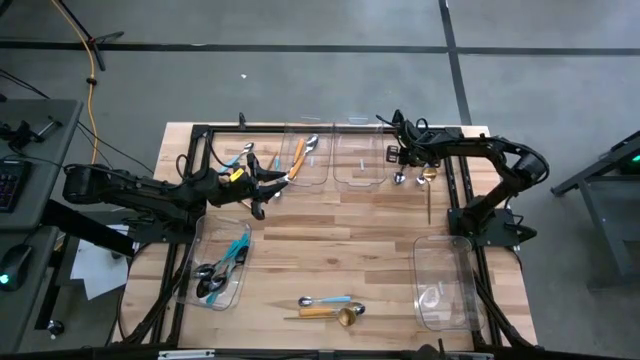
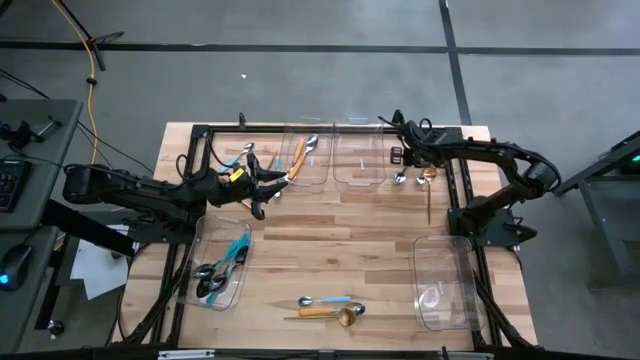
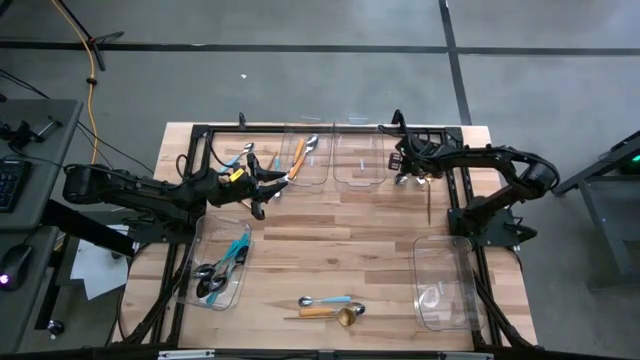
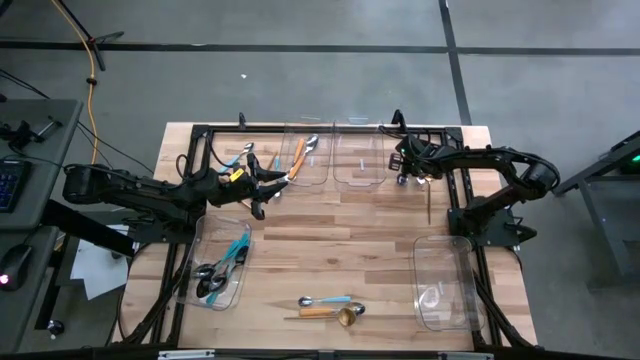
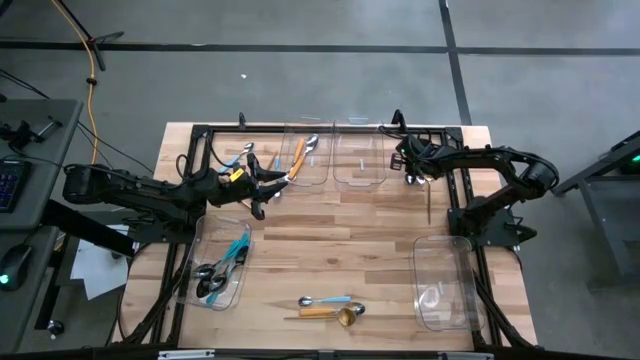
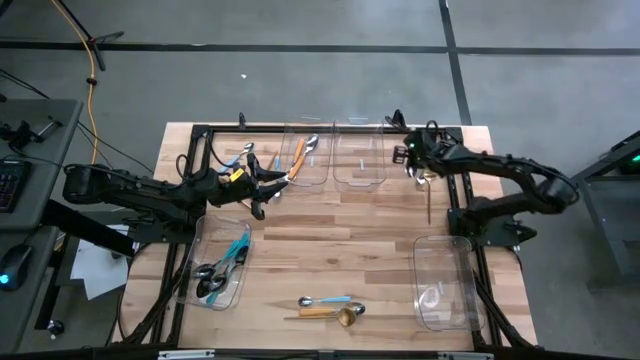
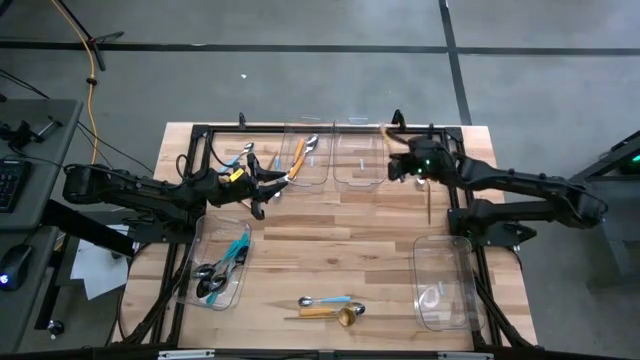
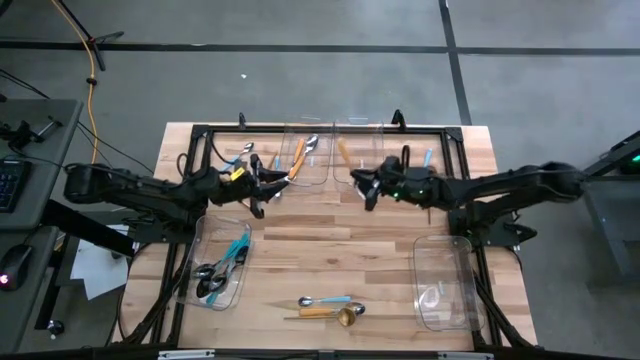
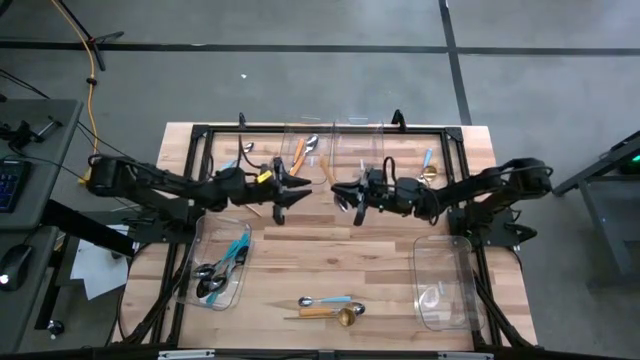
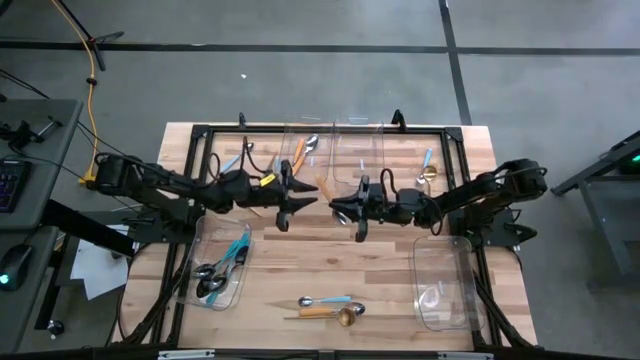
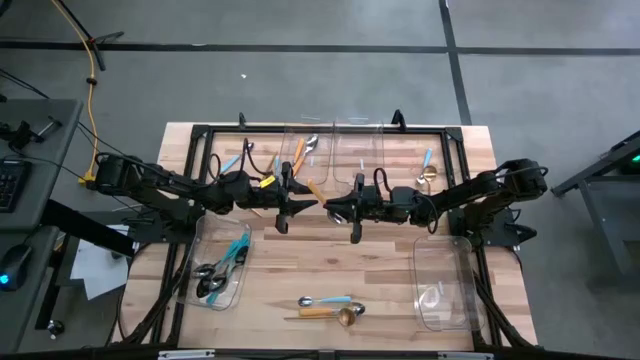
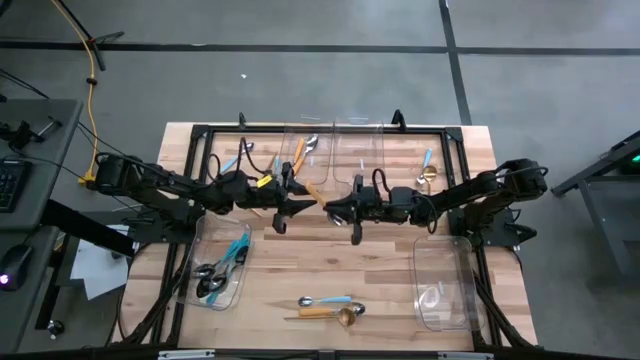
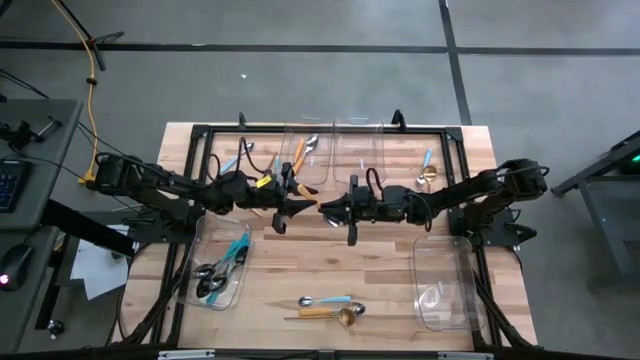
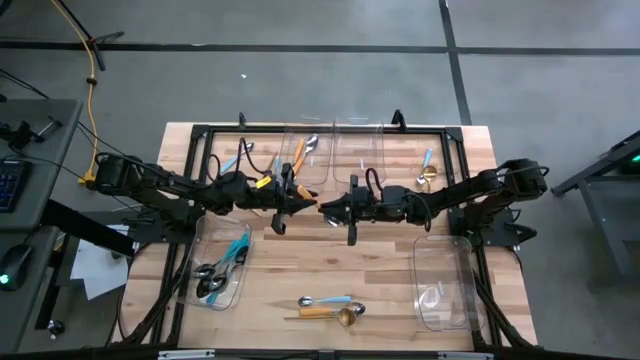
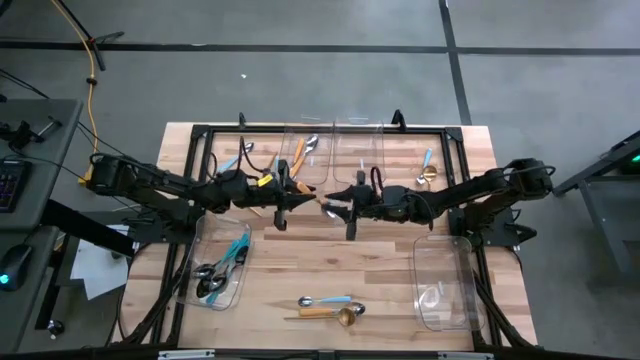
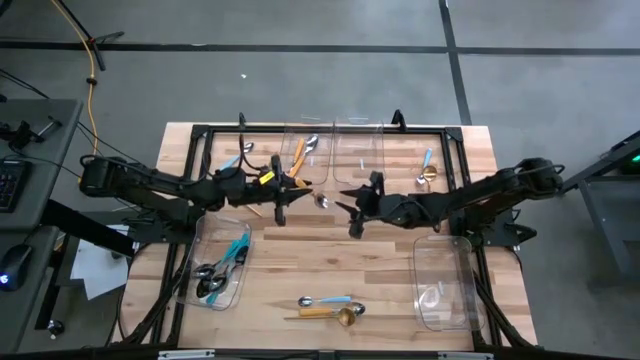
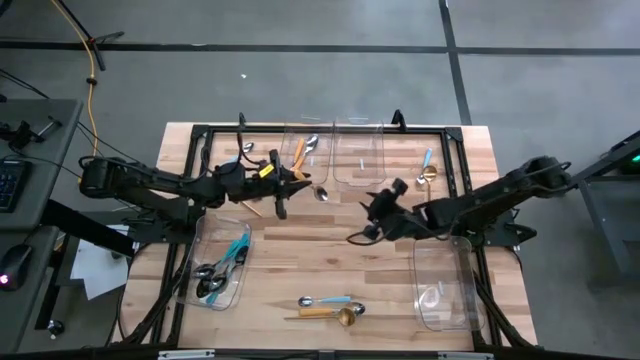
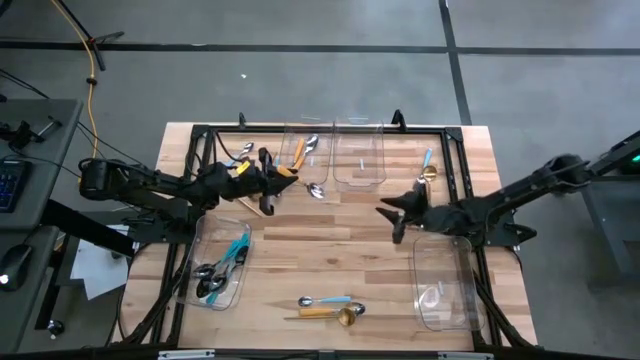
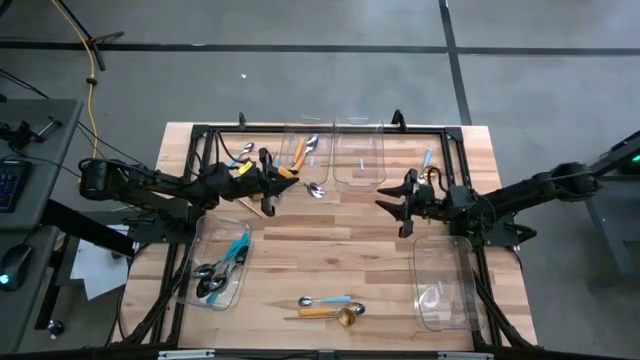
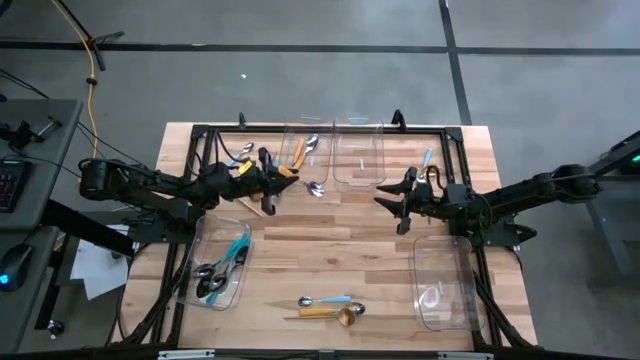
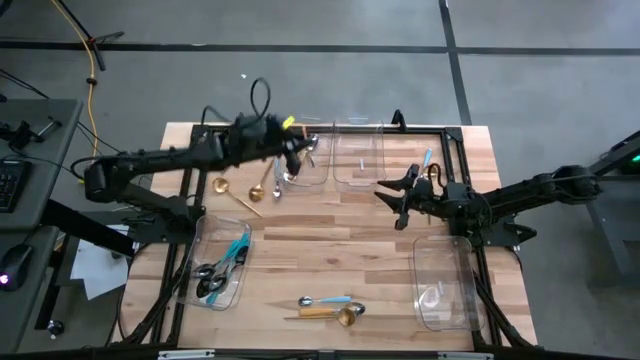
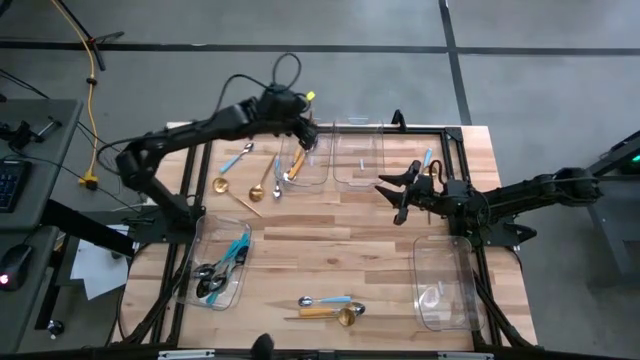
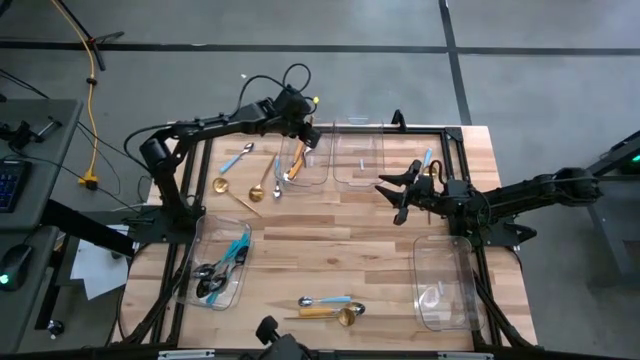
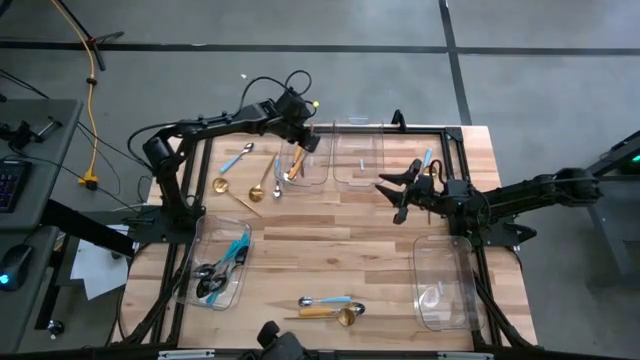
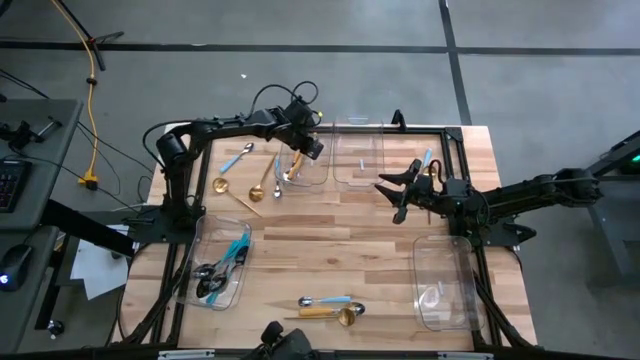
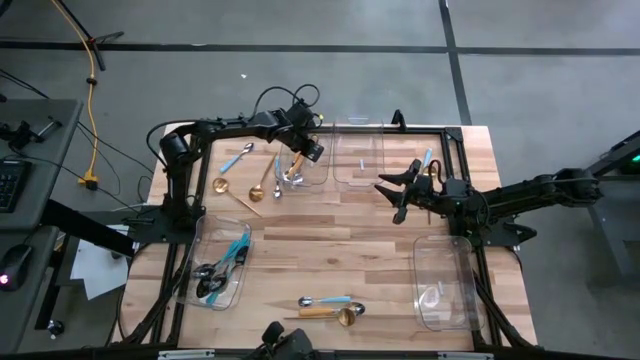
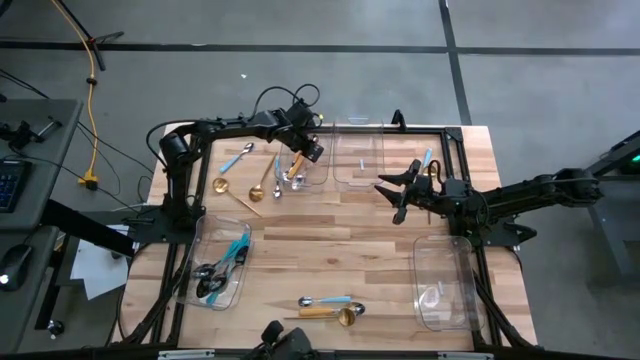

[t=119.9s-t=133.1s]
Task: Sort silverware by color (type)
Put the yellow spoon into the top left transparent bin
